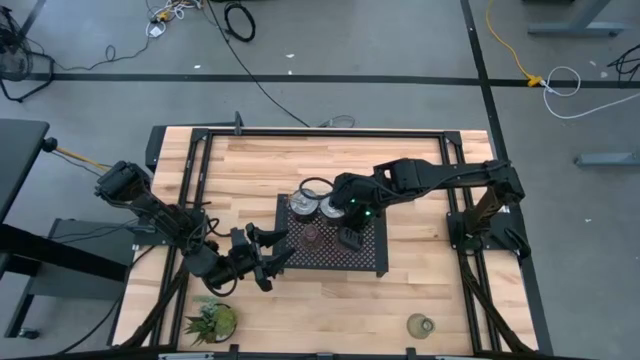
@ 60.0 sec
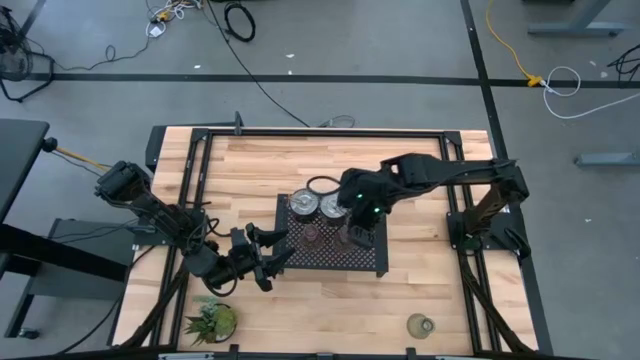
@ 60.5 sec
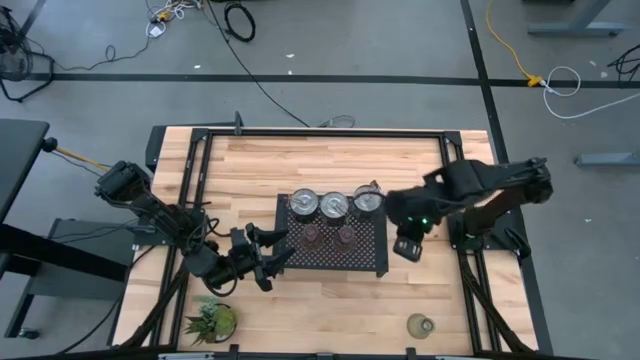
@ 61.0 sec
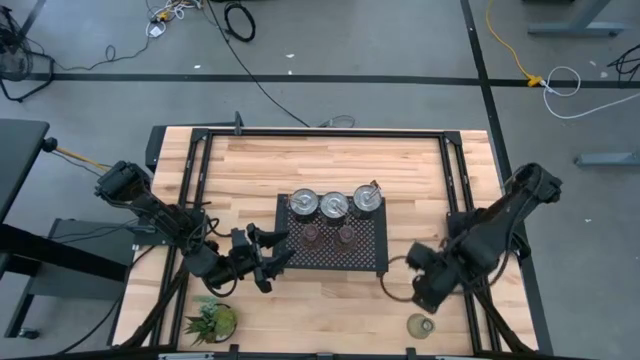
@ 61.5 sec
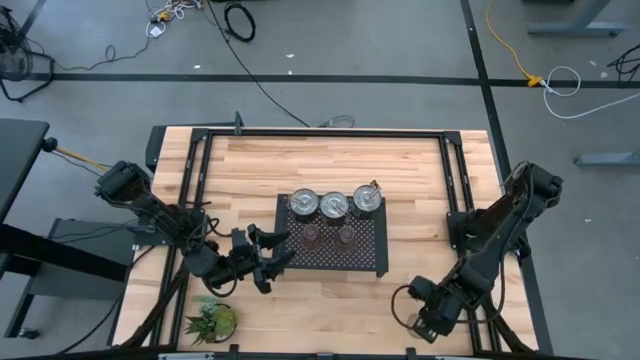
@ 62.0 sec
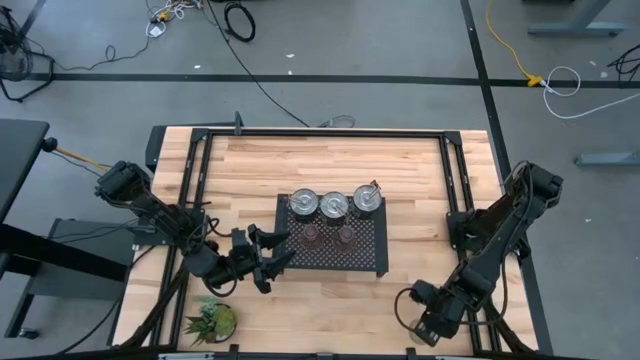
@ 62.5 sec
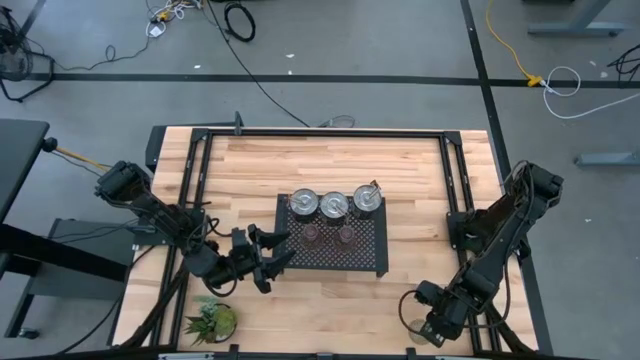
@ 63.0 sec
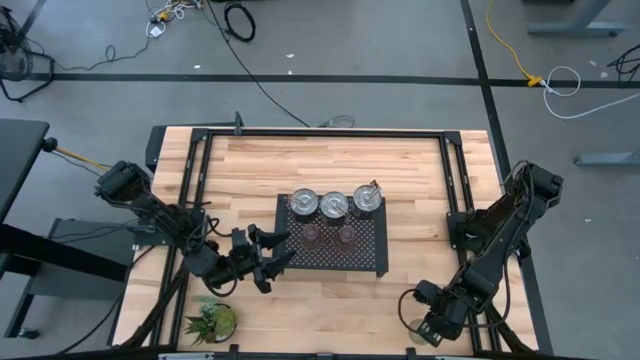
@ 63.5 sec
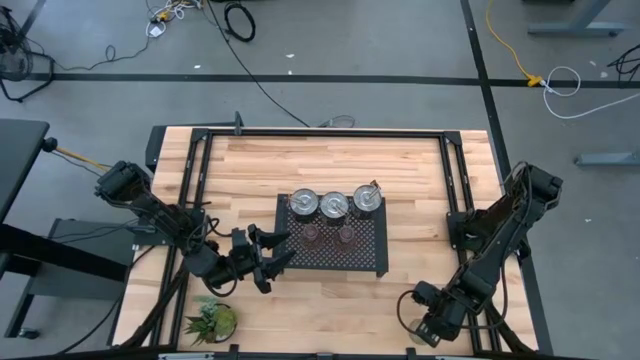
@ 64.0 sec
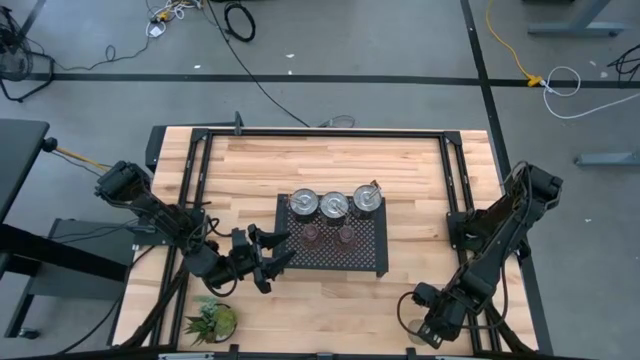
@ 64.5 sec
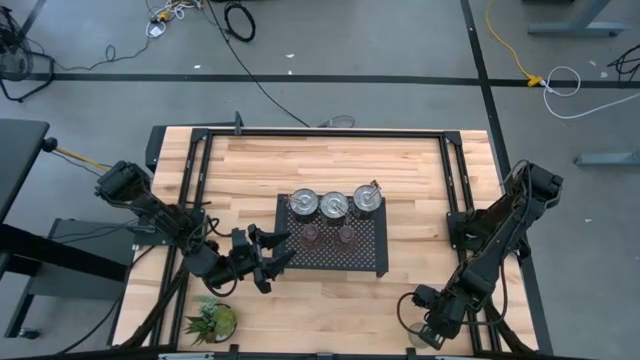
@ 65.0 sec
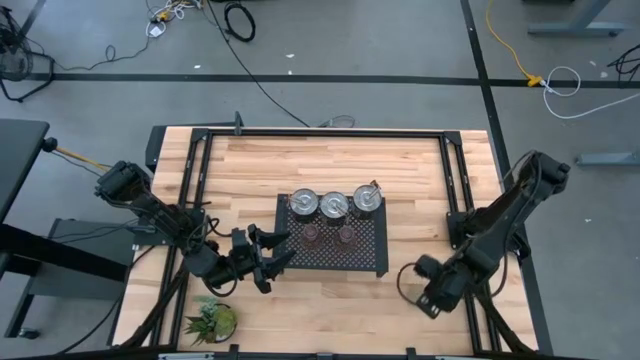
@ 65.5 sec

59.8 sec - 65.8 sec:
Task: Pick & Place candle stick holders
Put the green glass candle holder on the shelf aligned with the other glass candle holders

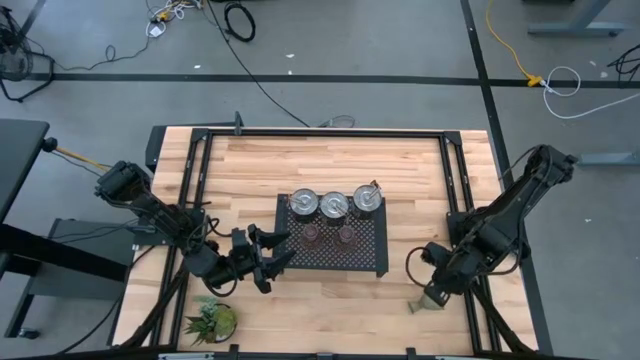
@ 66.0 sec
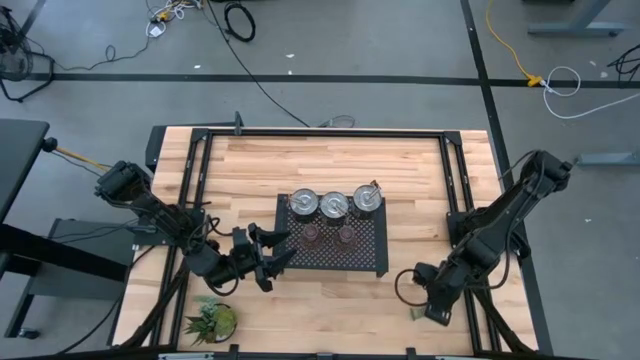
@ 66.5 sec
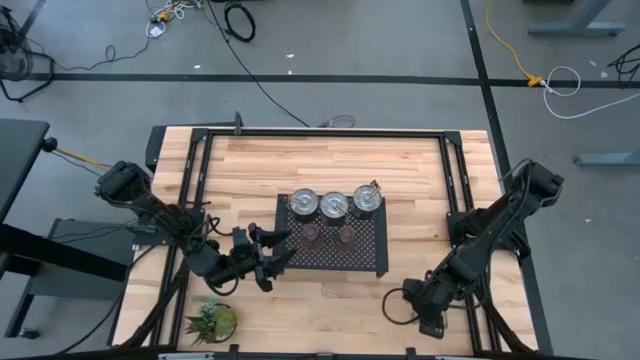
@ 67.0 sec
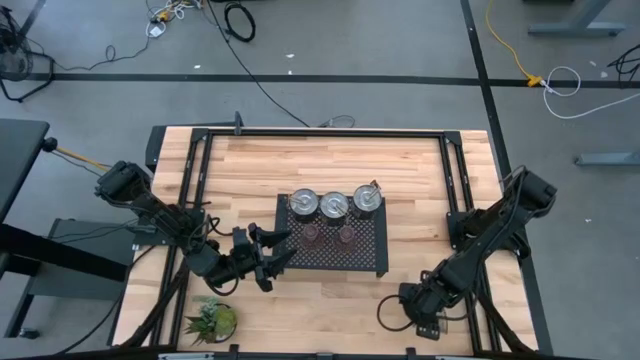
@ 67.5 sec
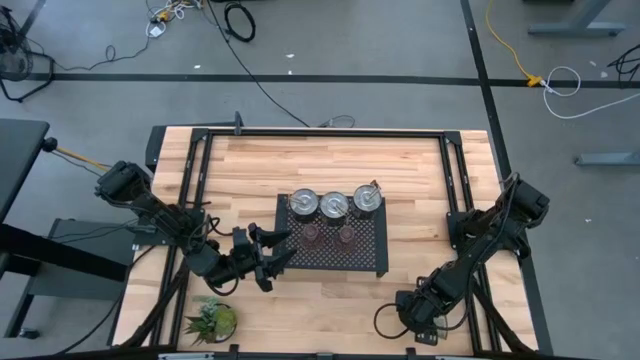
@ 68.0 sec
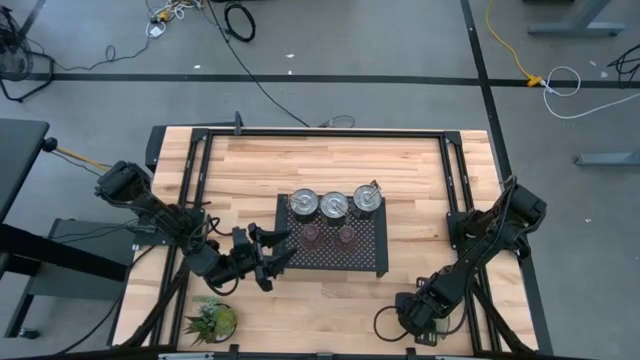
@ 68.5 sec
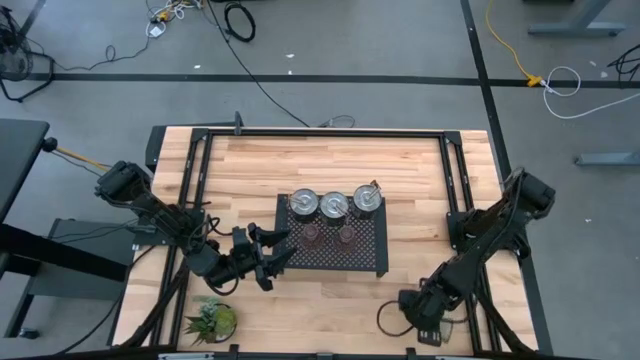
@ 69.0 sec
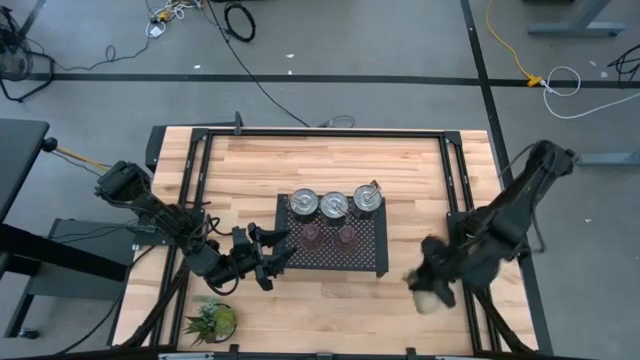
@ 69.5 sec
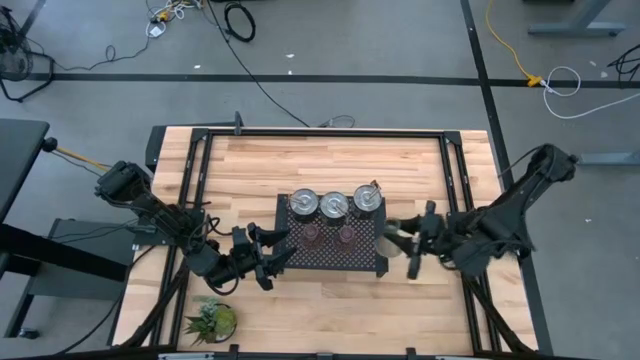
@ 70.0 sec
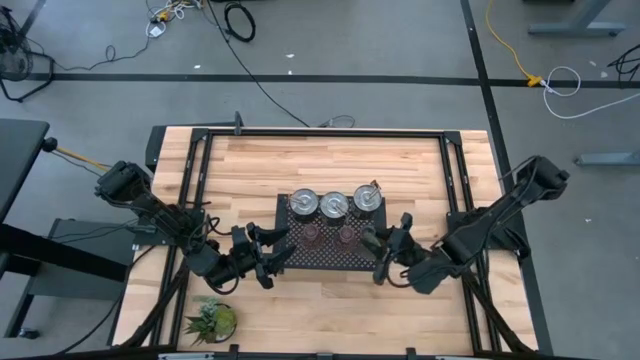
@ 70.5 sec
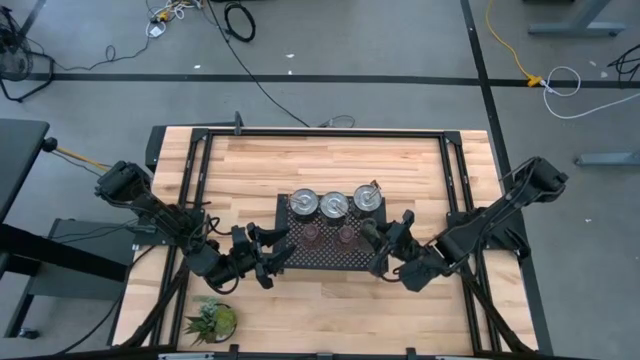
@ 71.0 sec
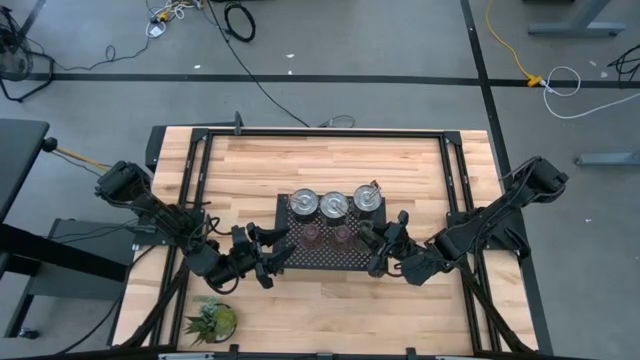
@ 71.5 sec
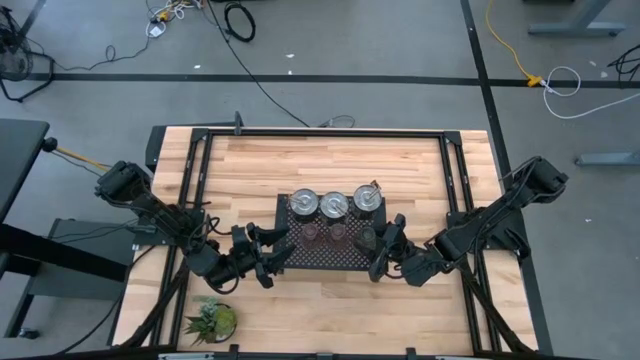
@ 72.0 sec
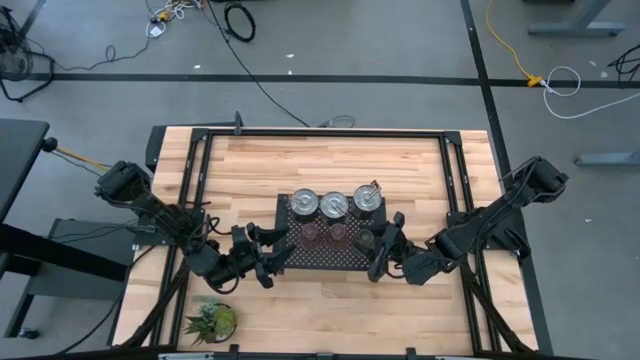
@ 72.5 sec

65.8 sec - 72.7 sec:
Put the green glass candle holder on the shelf aligned with the other glass candle holders

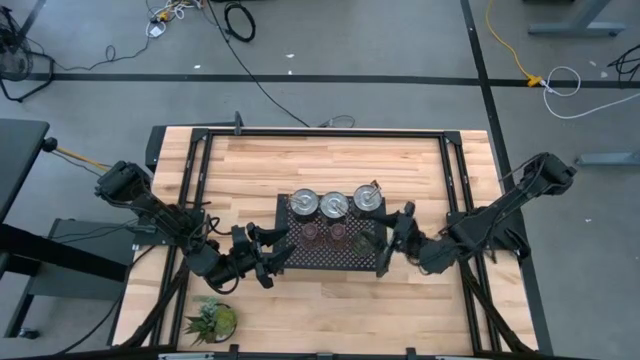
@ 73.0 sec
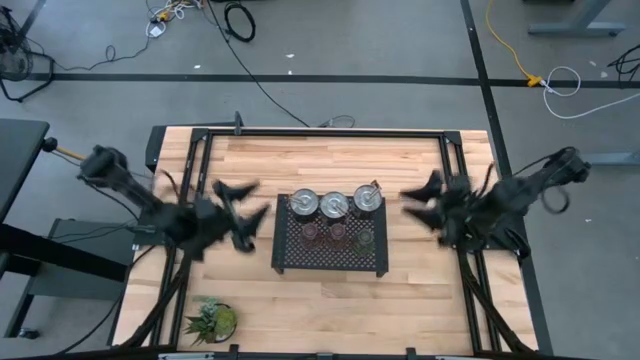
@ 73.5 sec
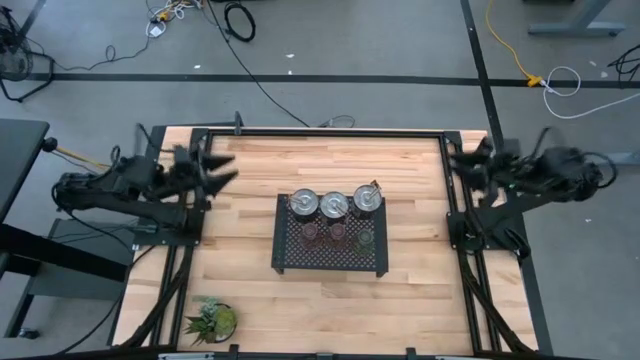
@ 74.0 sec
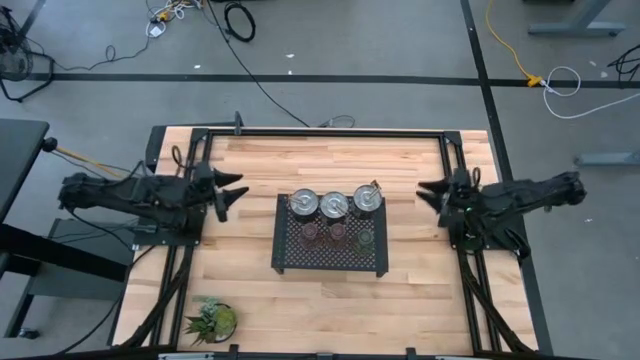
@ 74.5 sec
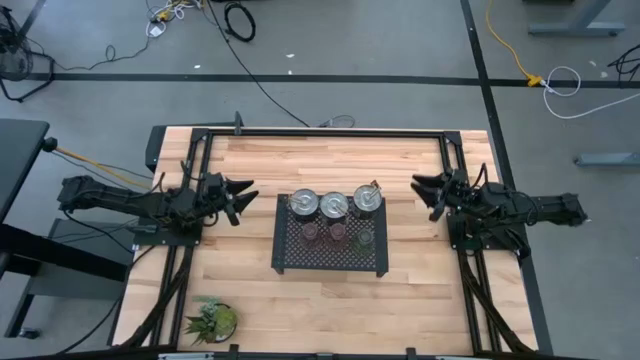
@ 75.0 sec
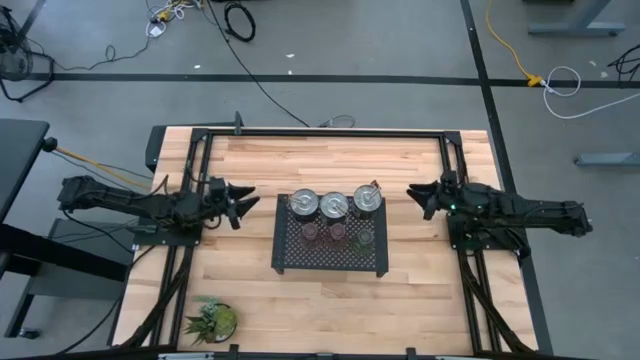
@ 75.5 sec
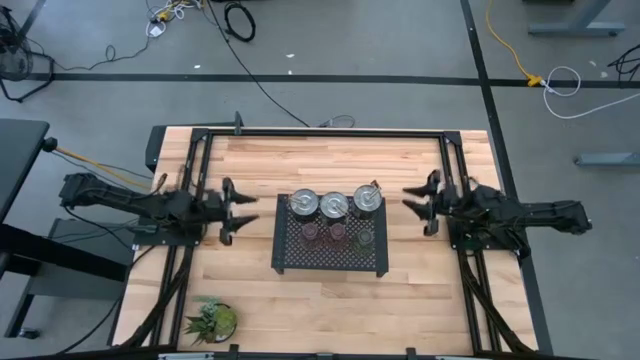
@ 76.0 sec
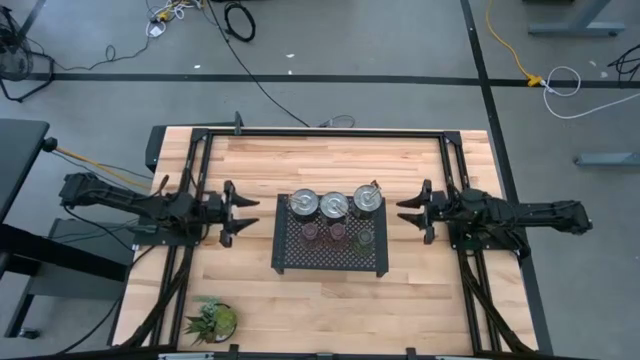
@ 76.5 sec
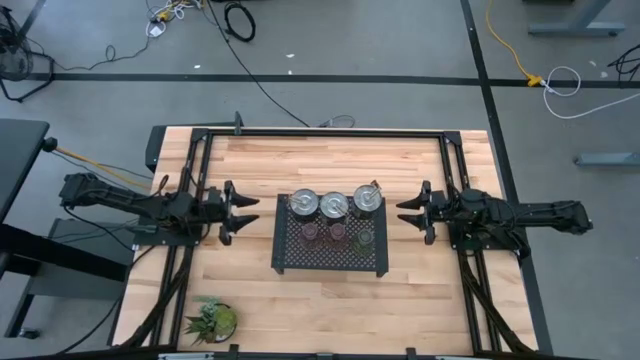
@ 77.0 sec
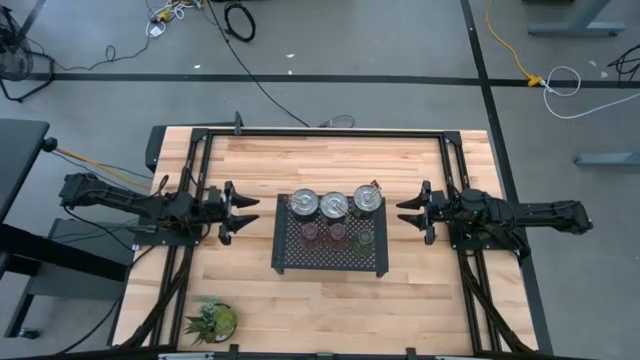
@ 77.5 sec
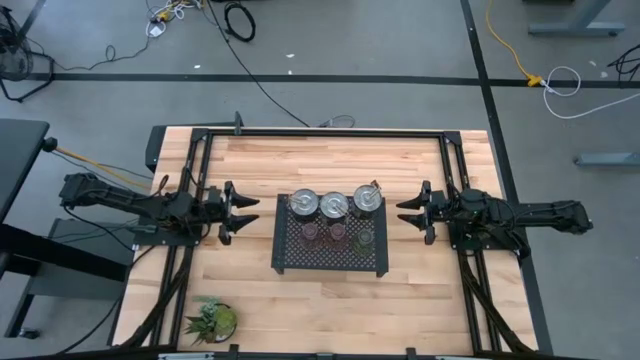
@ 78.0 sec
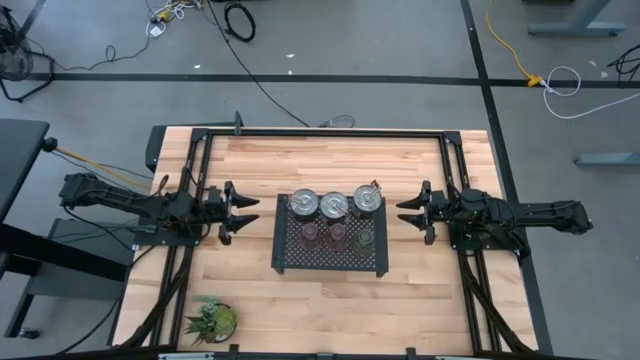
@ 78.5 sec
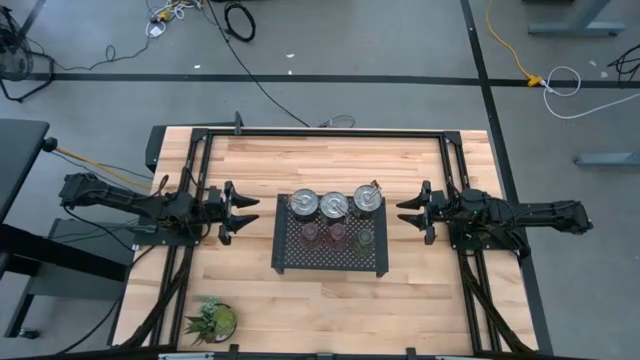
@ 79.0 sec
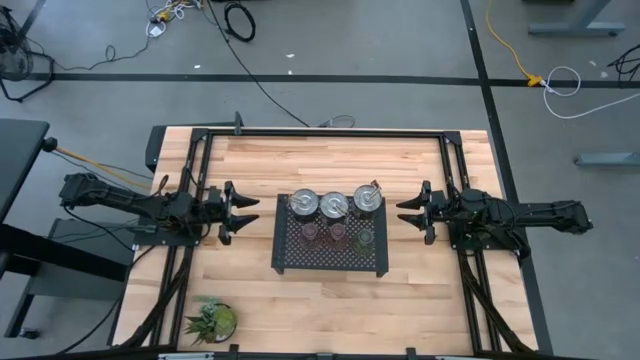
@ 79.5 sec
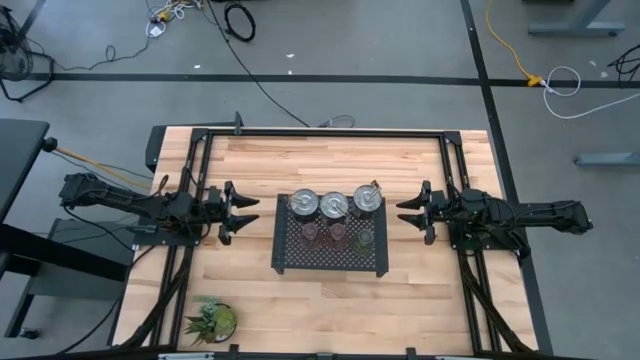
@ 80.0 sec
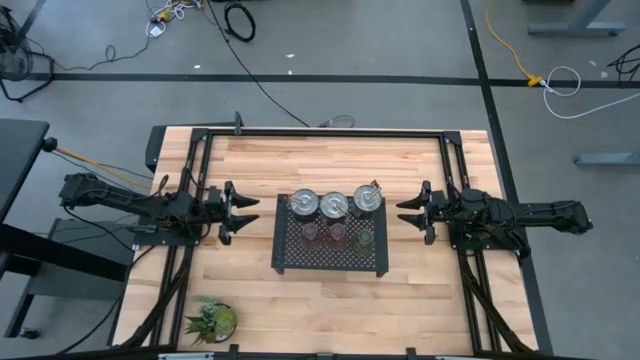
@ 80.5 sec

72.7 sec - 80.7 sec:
Return to Home Position
